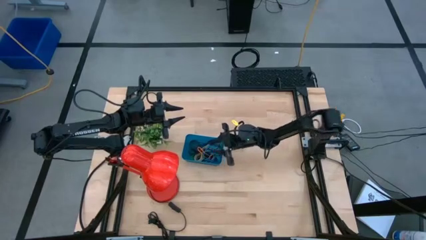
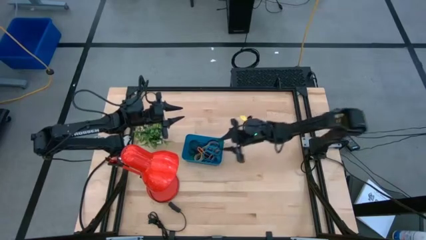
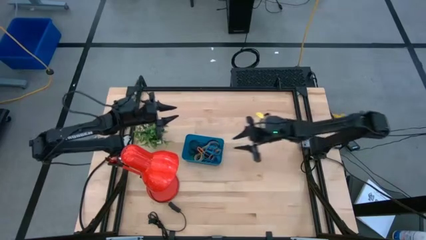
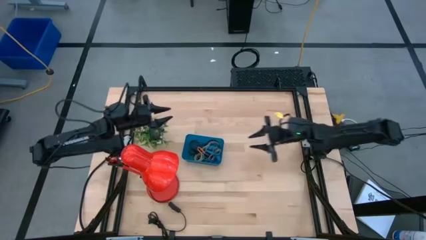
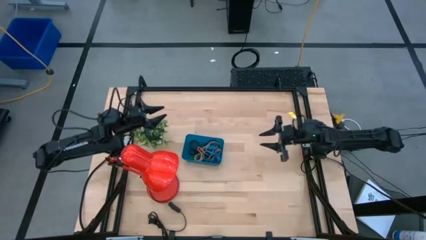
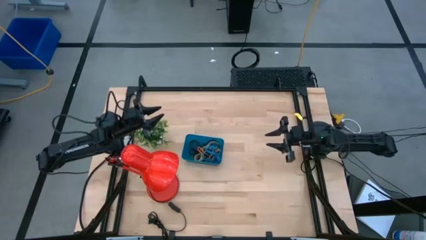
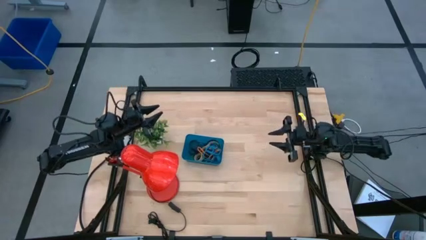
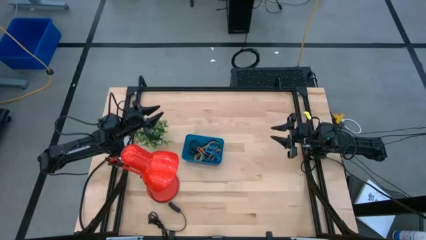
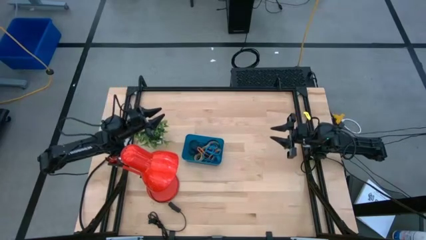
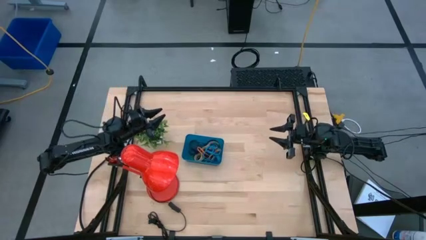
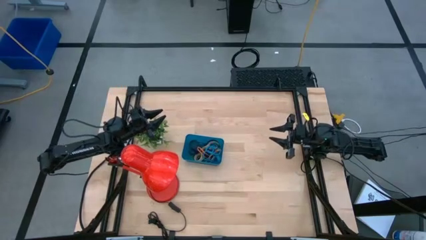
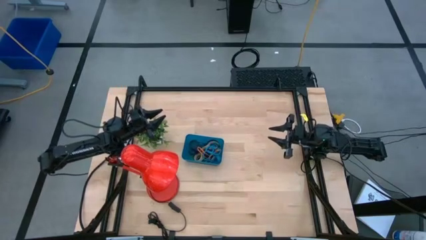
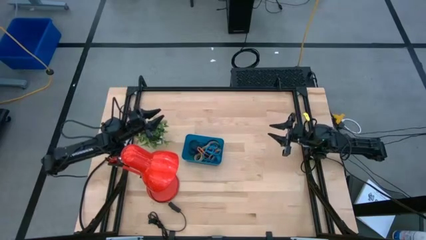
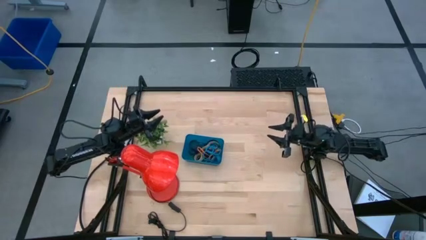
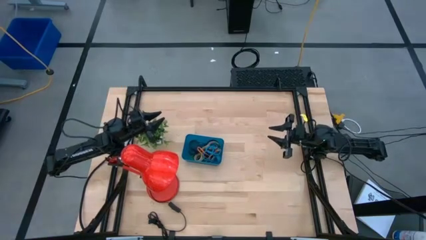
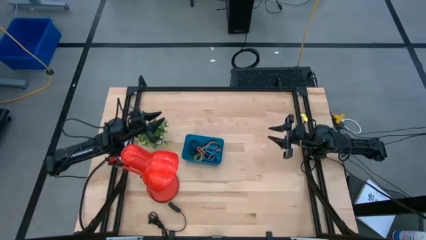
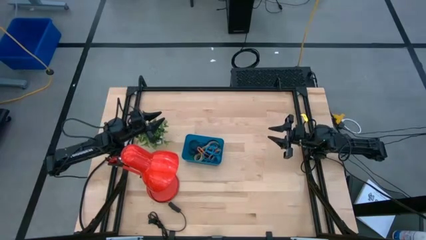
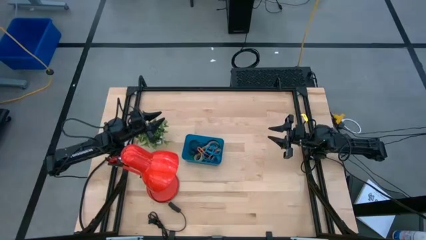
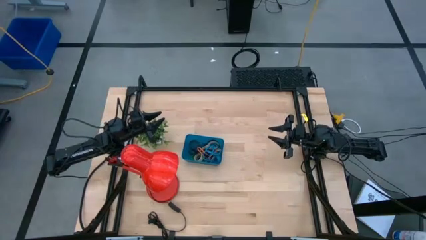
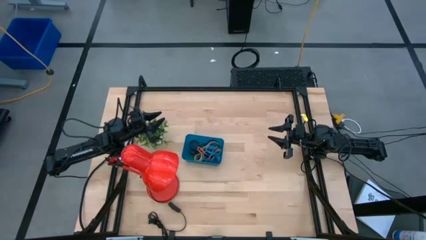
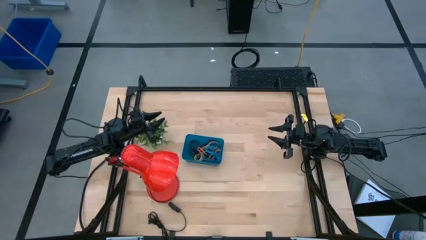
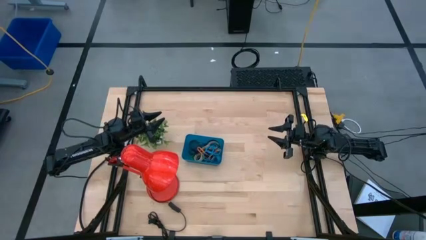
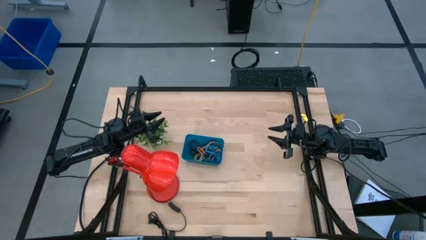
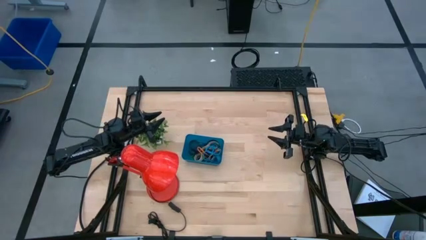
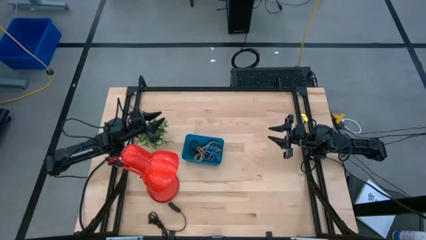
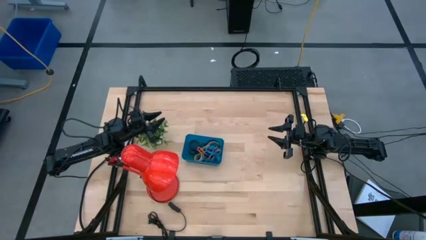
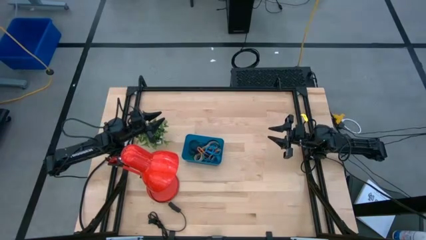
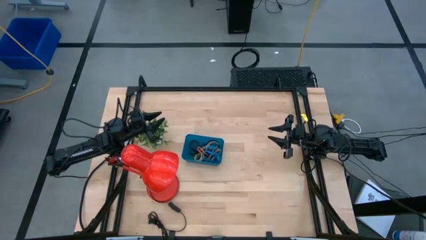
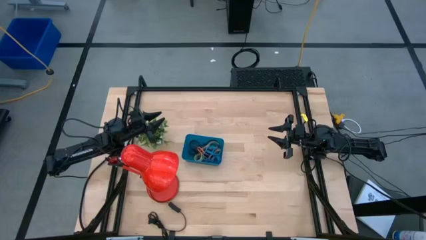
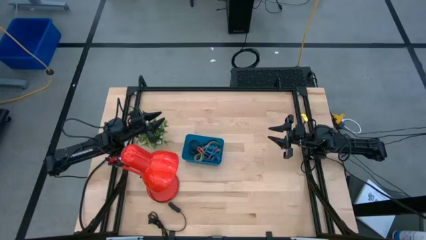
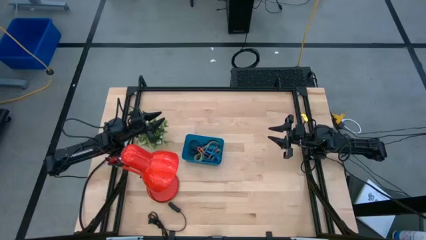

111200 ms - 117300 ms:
Task: Pick and place rubber bands into bin
Return to Home Position

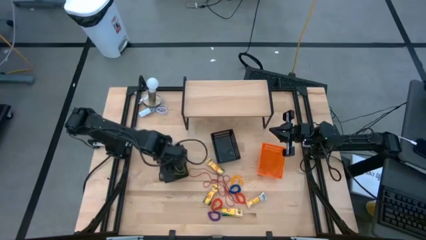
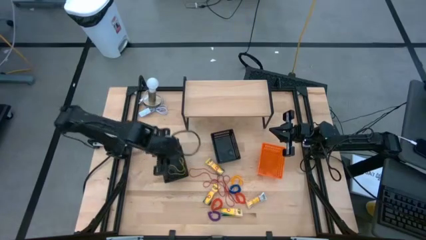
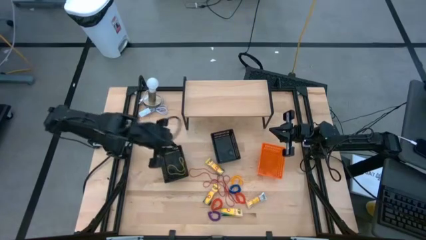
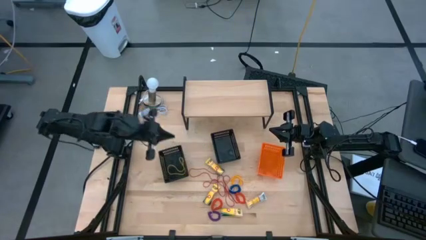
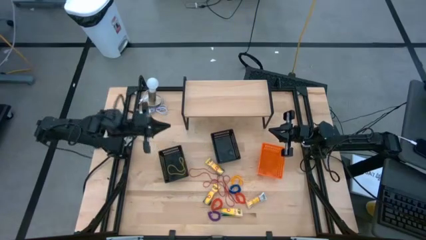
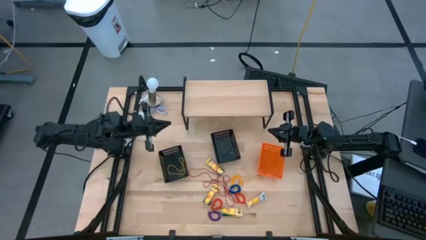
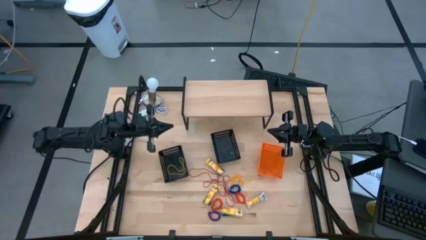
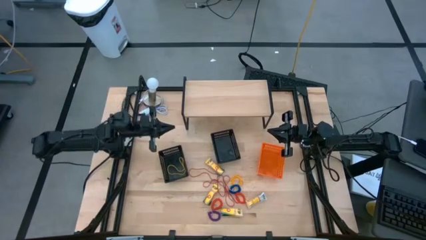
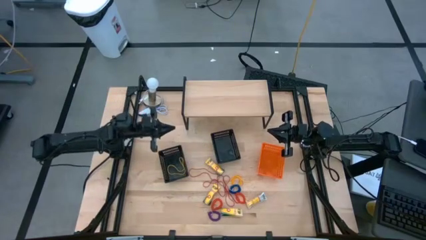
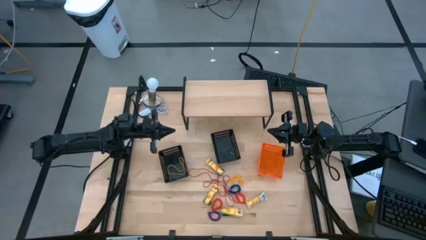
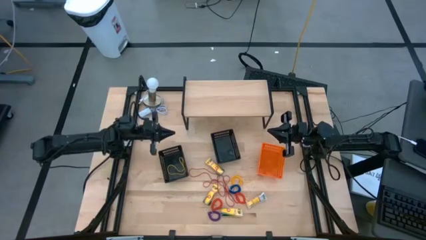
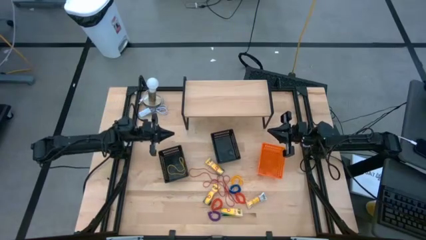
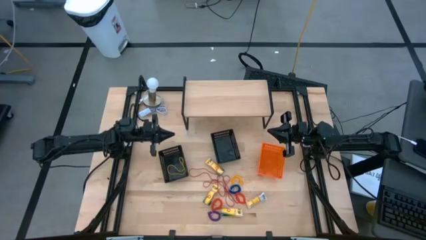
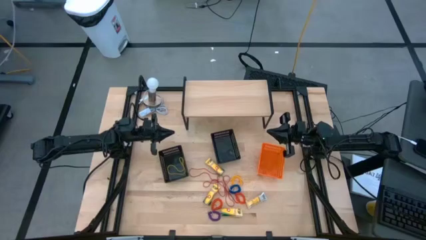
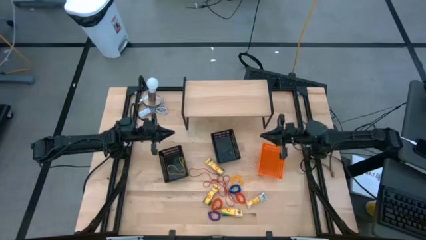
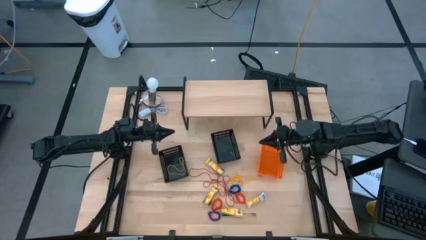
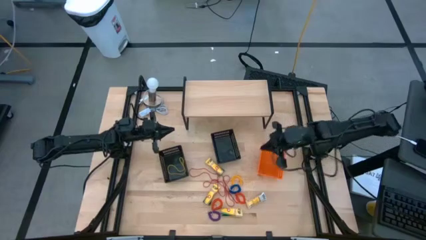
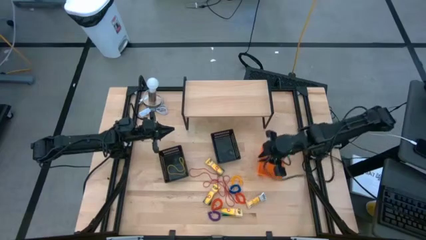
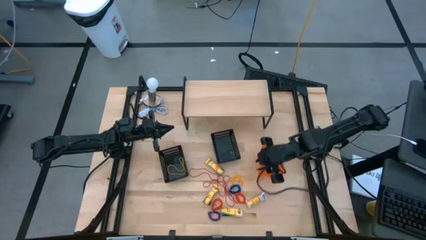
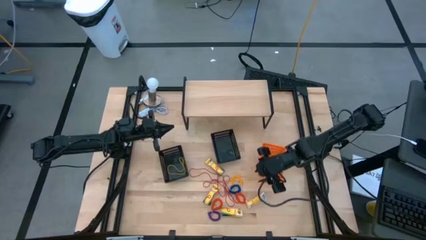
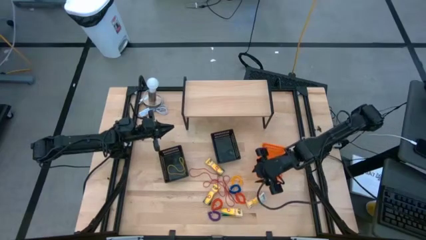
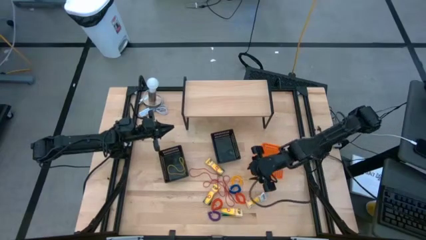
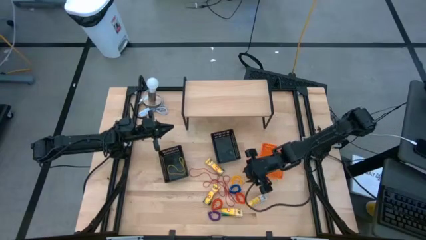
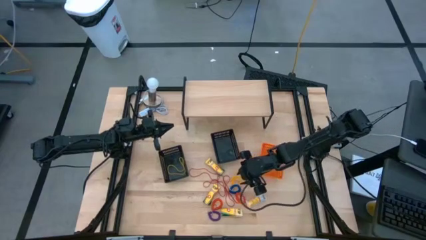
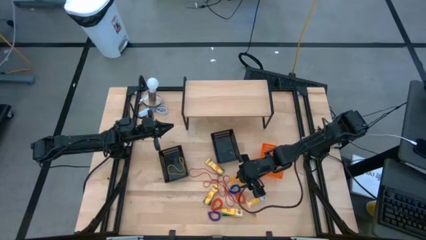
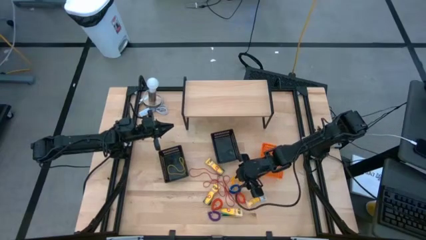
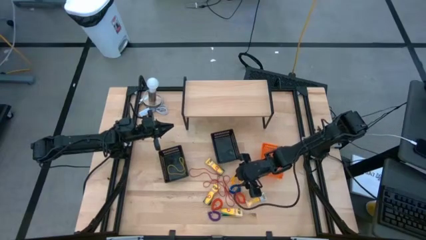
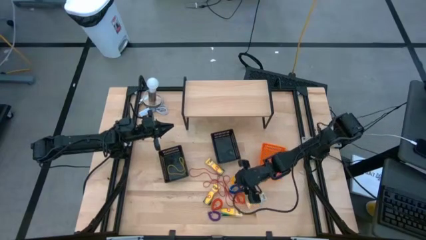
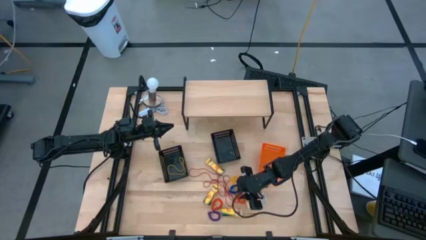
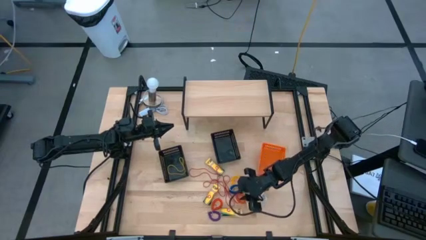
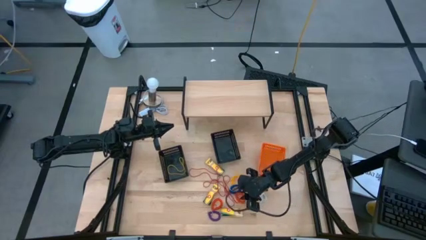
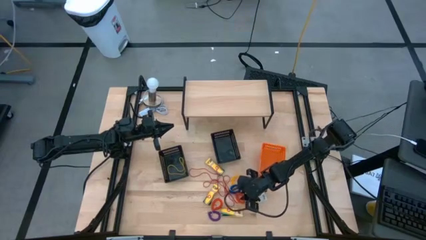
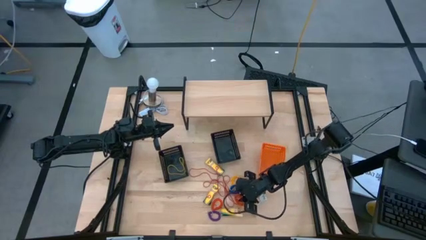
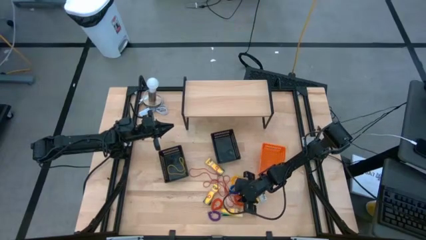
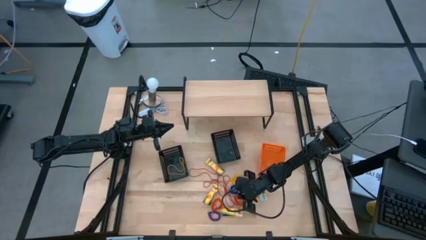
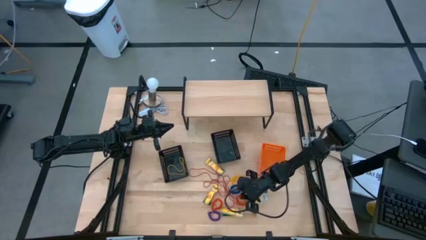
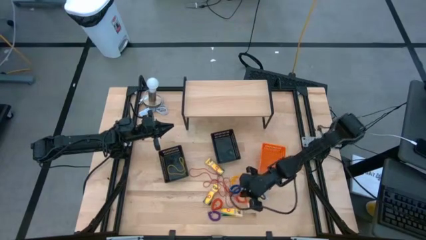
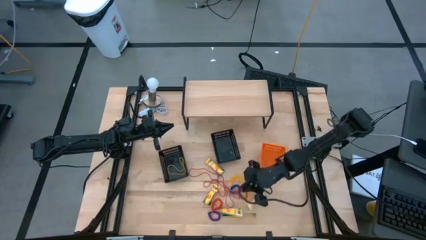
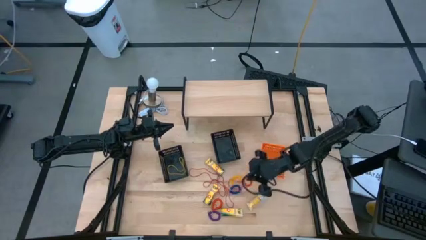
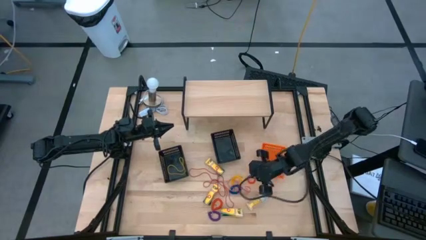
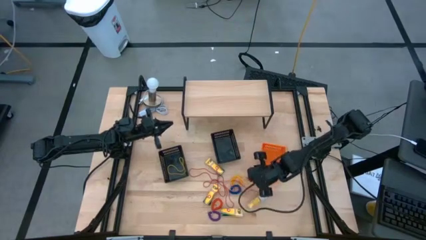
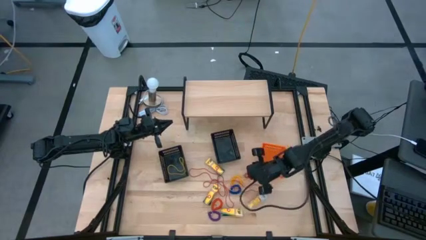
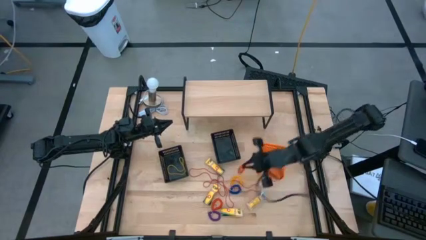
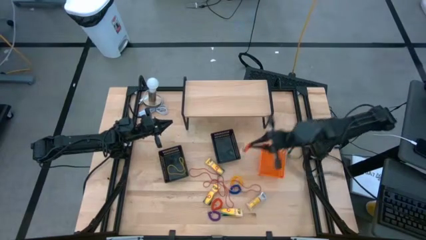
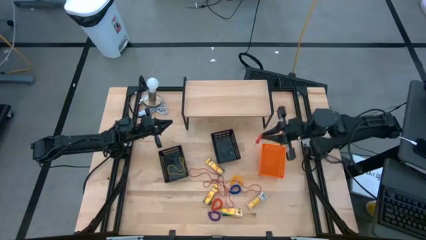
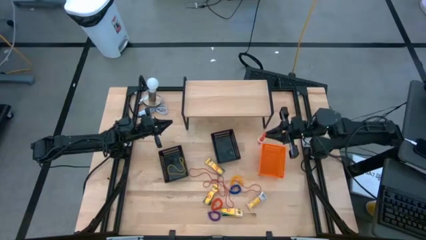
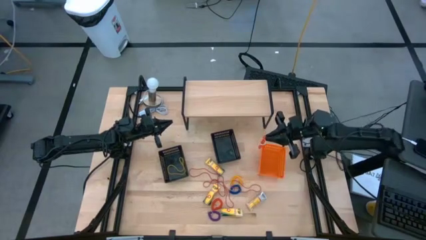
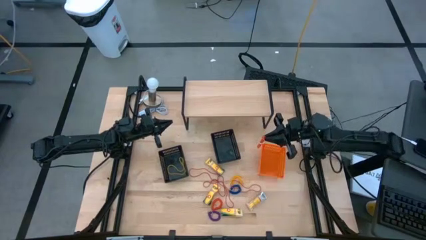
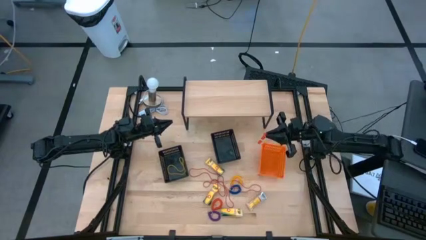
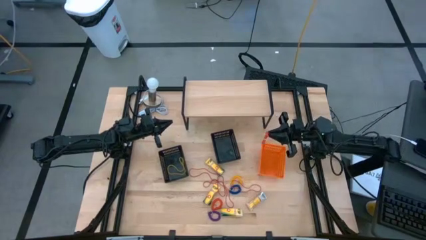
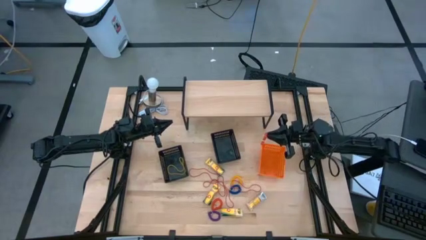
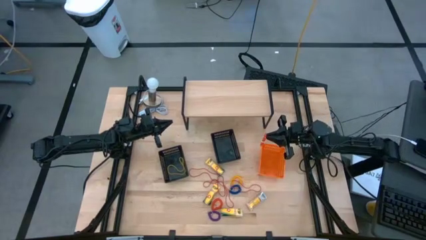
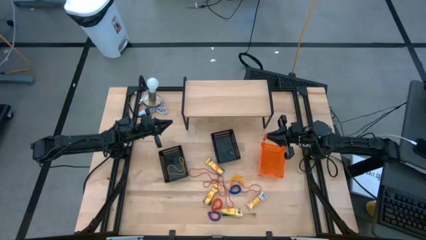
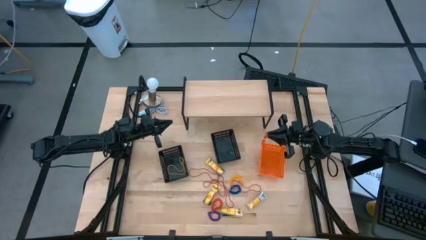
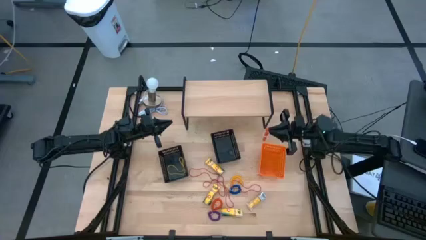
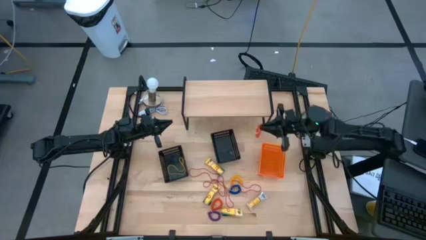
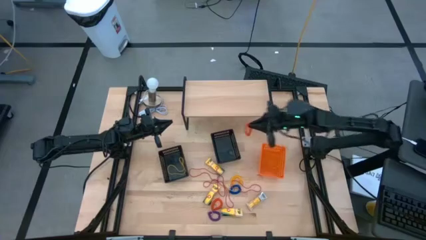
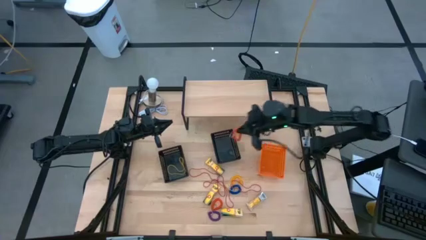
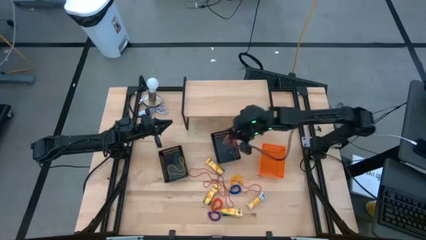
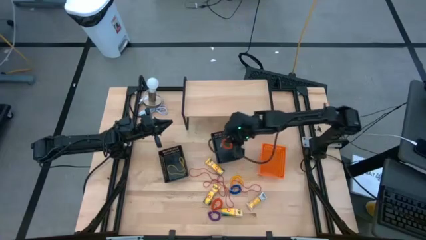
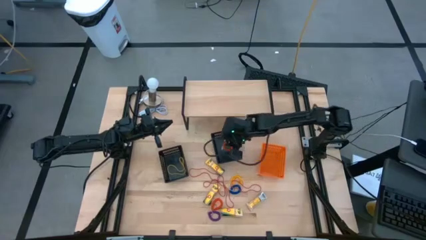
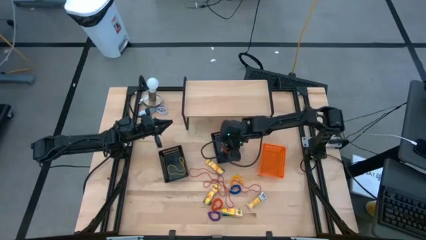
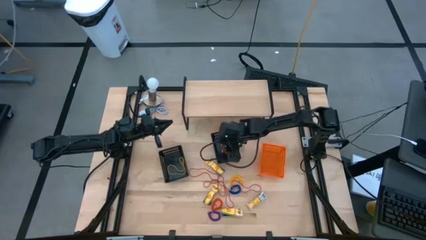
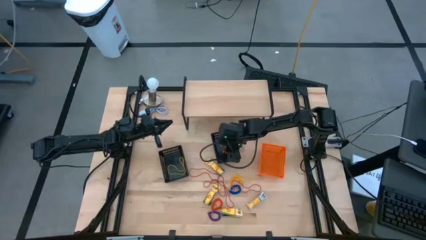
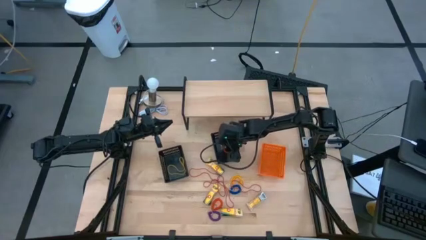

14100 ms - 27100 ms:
Task: Pick & Place Office Desk Supplies
Put the orange spring rubberband into the right black bin
